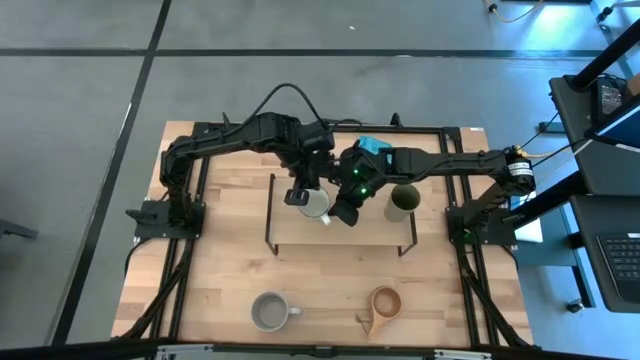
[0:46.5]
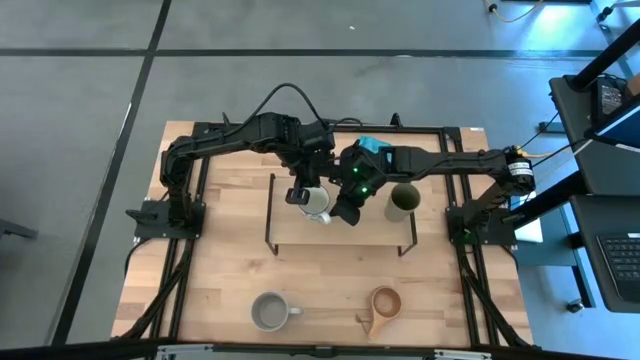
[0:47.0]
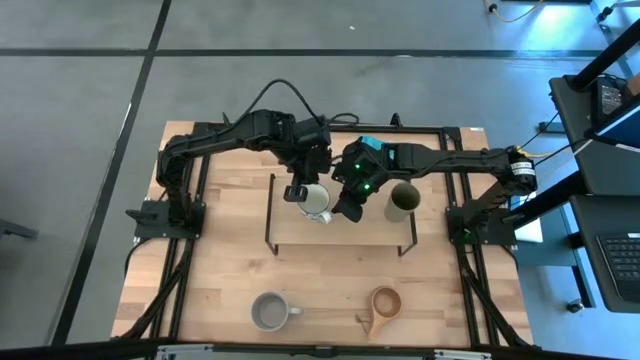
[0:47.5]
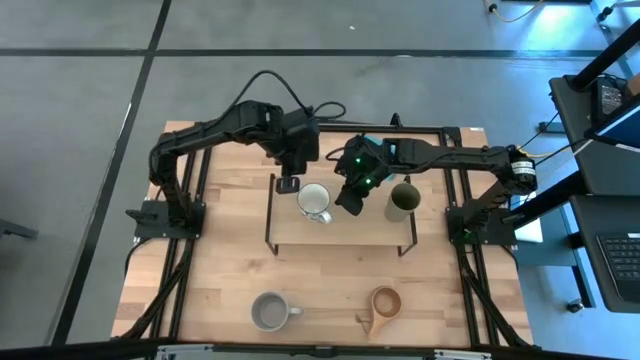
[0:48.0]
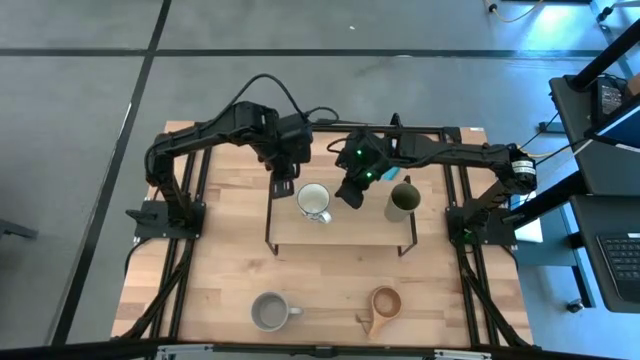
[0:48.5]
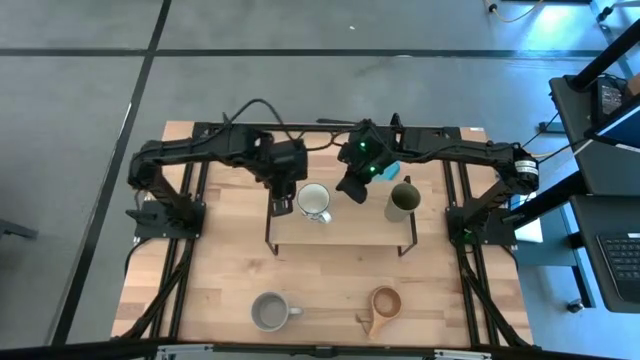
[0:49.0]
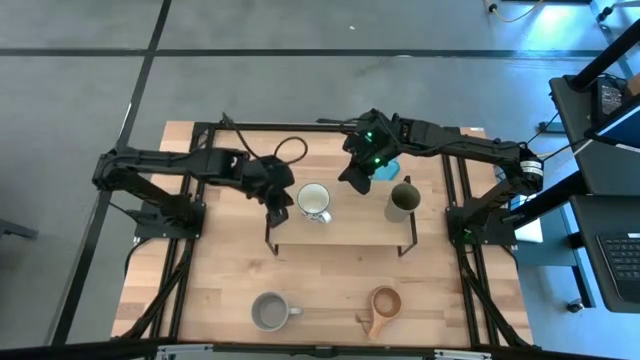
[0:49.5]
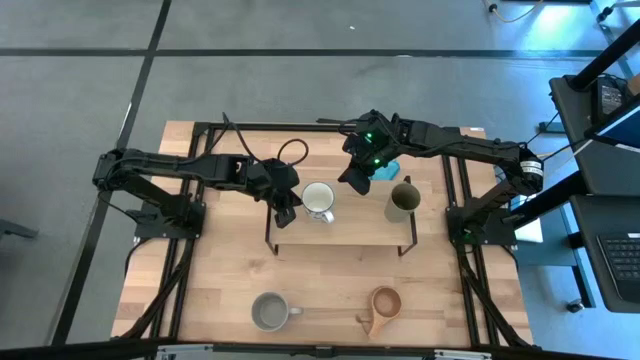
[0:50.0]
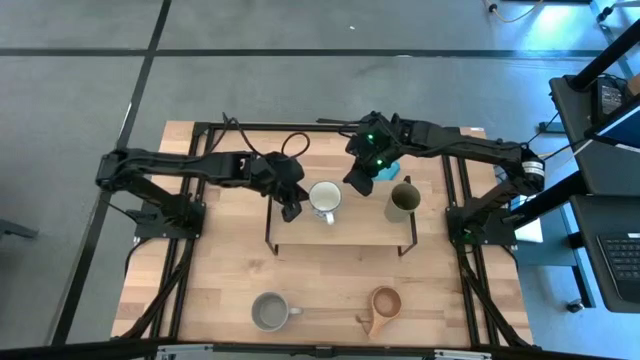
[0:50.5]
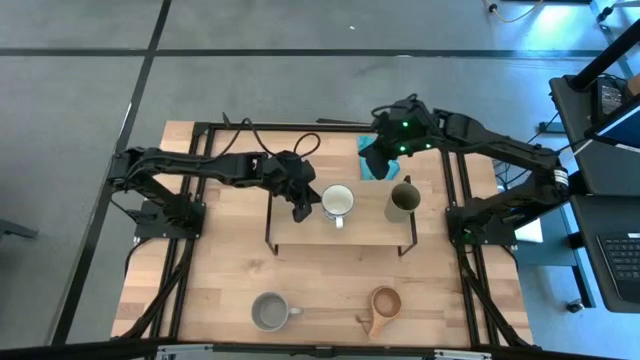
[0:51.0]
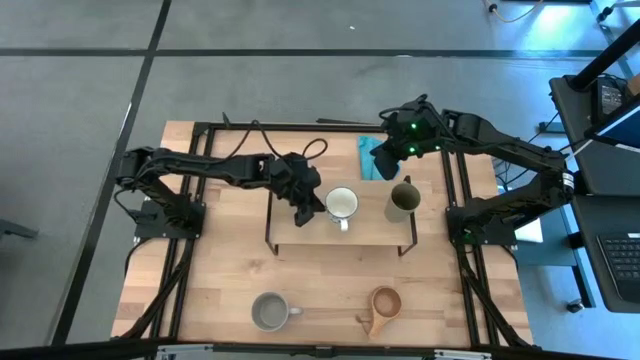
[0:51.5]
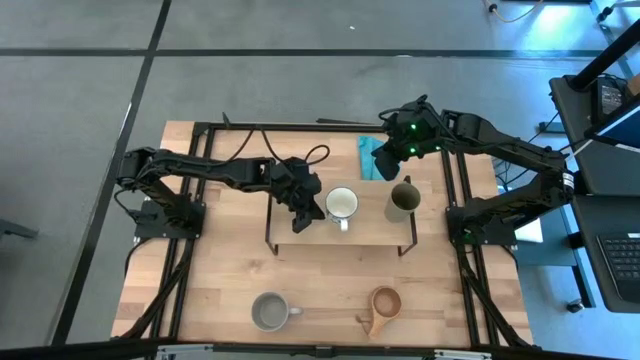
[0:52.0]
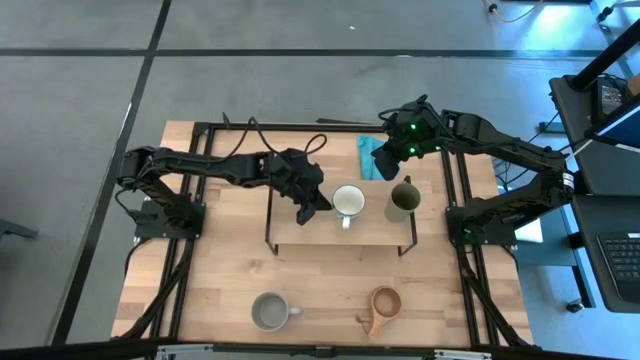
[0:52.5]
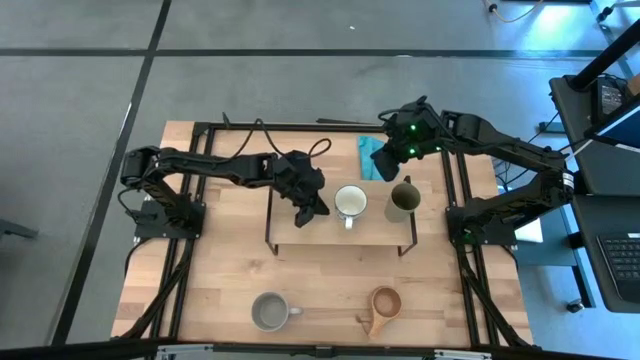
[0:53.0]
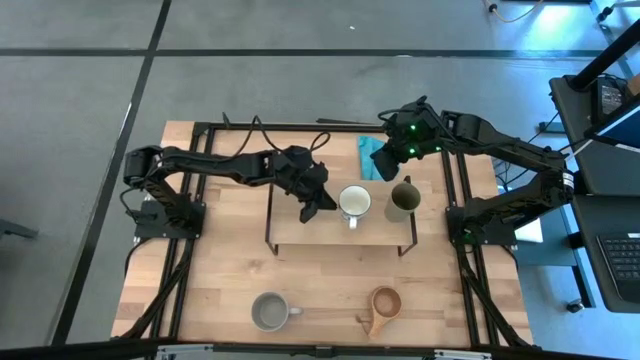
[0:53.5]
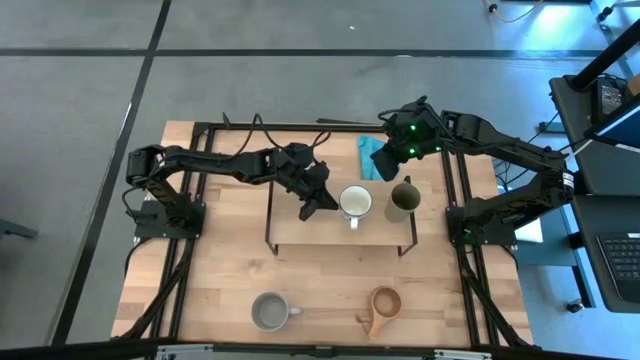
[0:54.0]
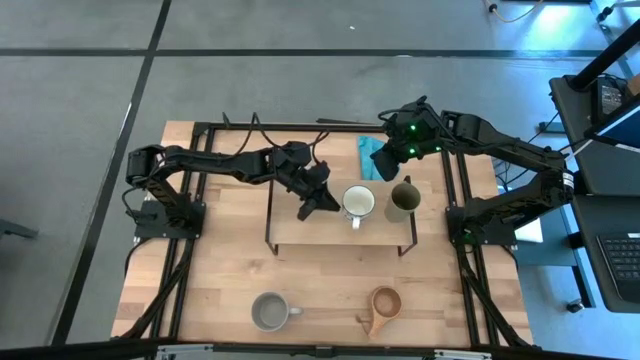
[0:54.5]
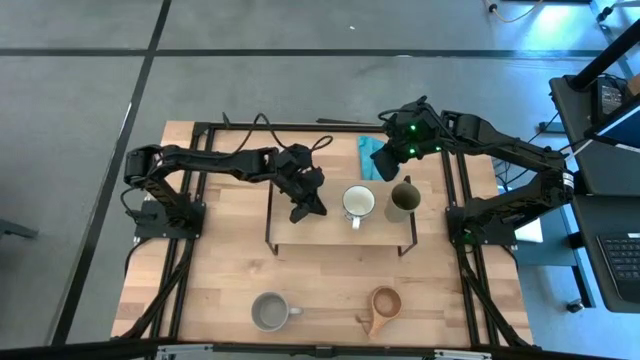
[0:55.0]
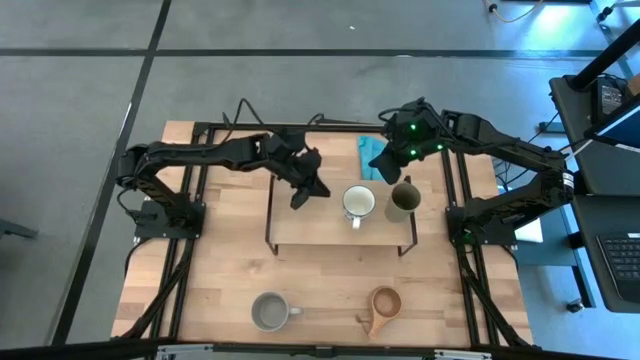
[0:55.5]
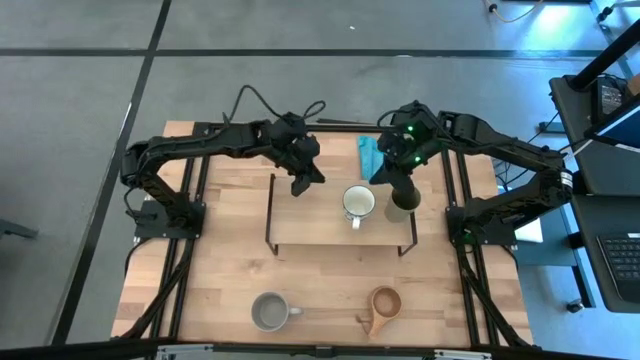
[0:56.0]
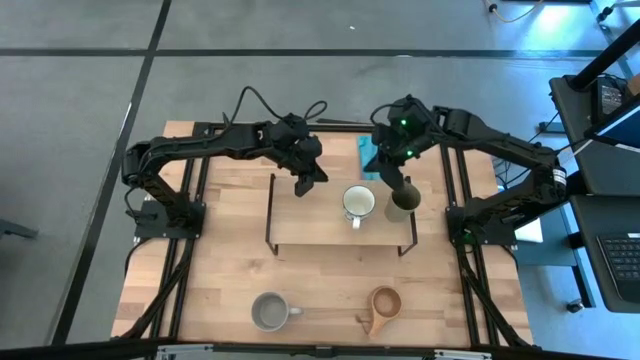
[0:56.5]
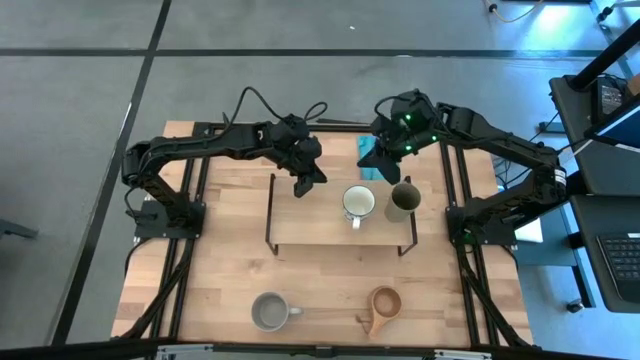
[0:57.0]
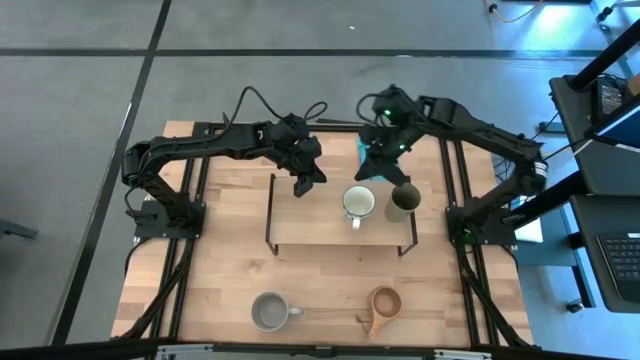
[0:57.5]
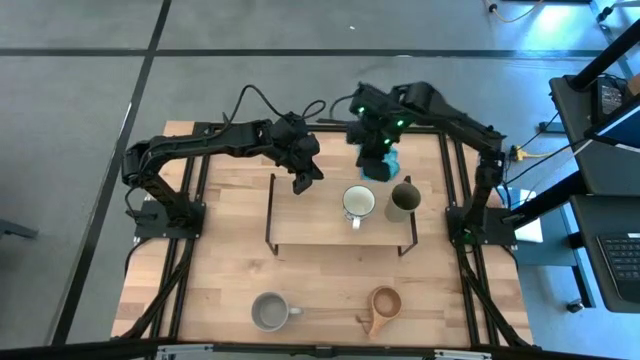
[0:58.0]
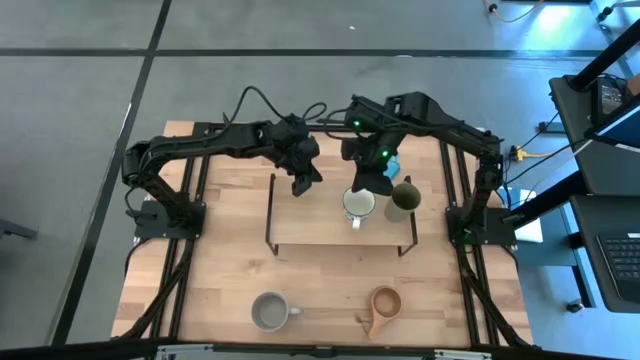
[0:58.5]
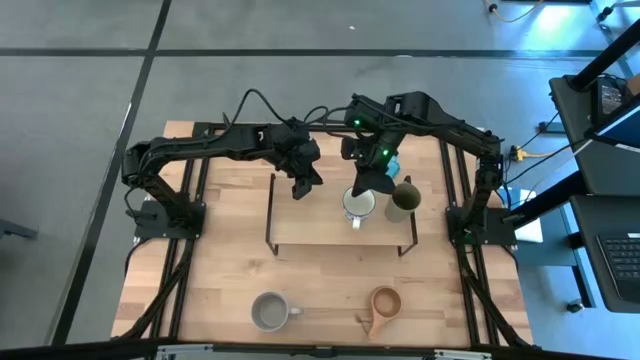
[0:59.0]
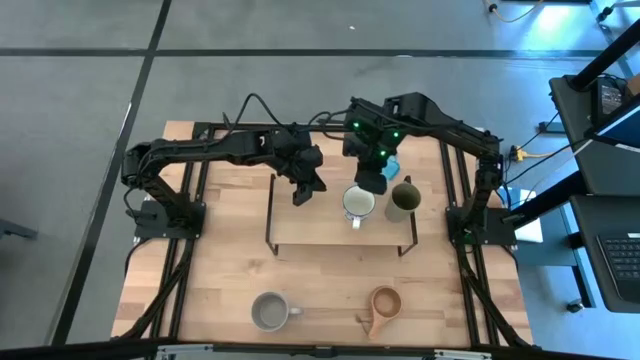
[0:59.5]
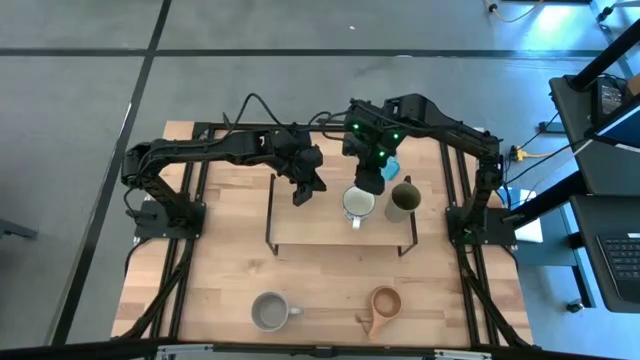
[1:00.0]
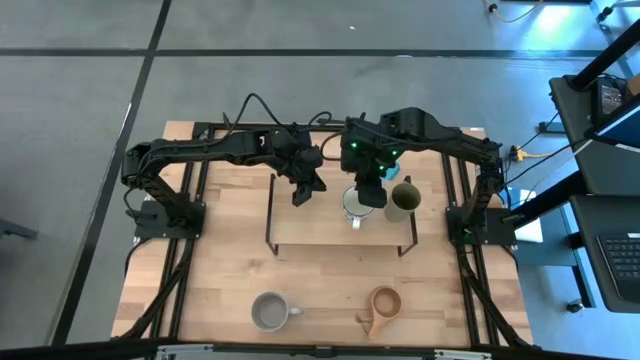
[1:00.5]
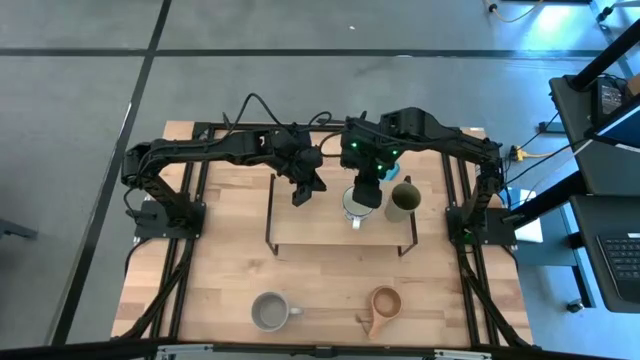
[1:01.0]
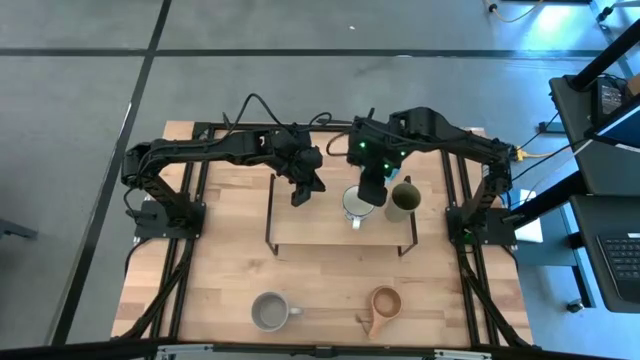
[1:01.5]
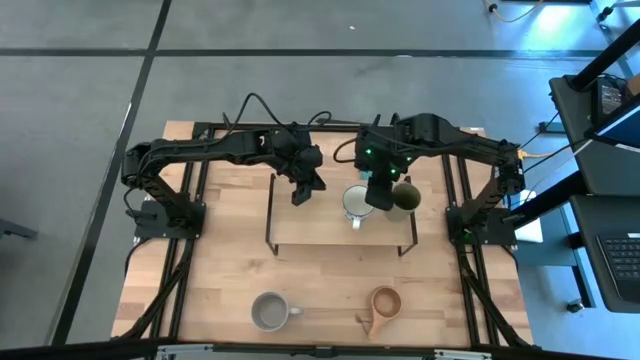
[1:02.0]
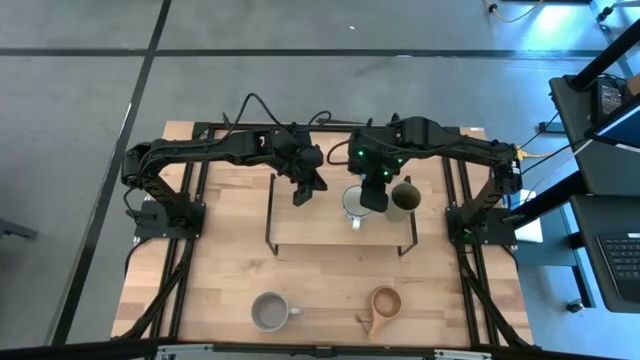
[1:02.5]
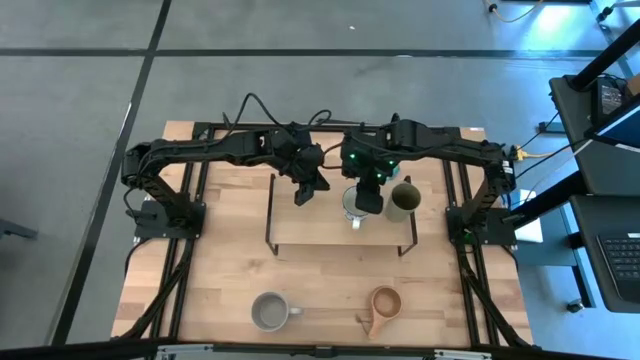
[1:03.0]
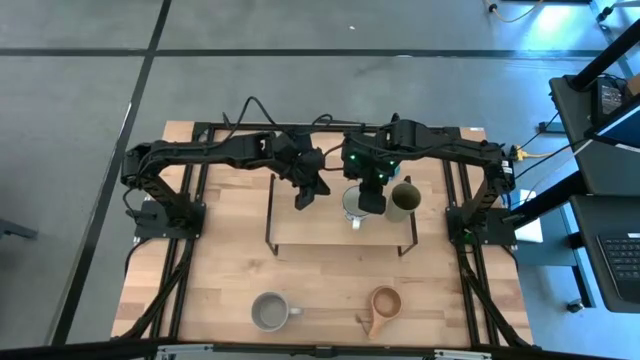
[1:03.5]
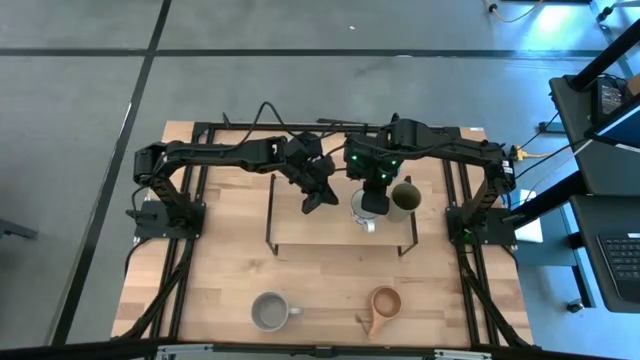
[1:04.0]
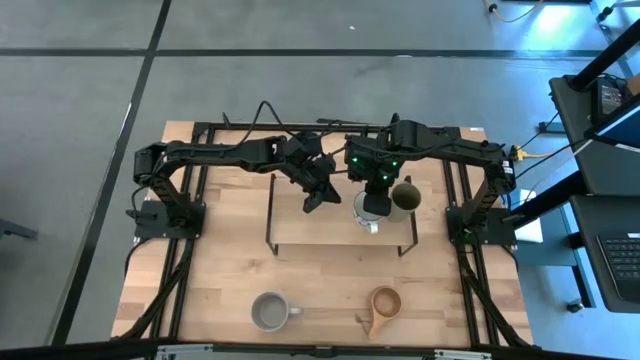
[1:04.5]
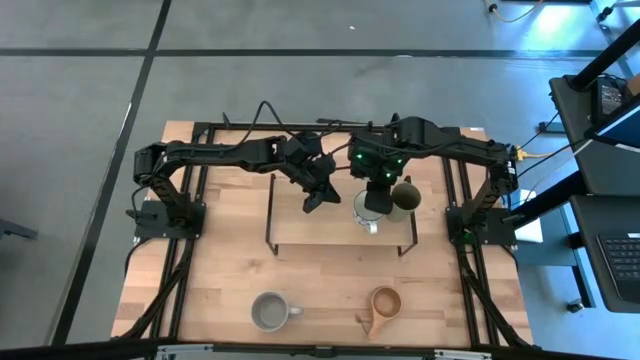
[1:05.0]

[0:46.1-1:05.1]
Task: Stack small to large cups/mugs on shelf
Put the blue patterned mug on the shelf

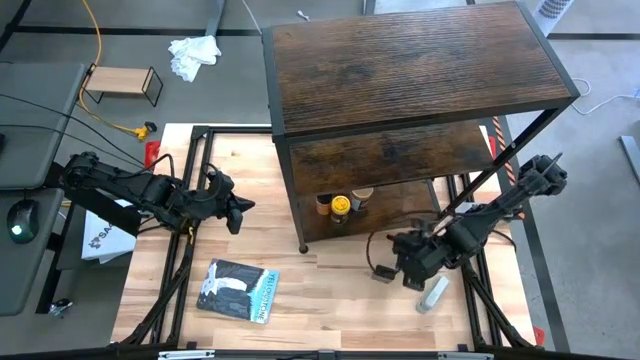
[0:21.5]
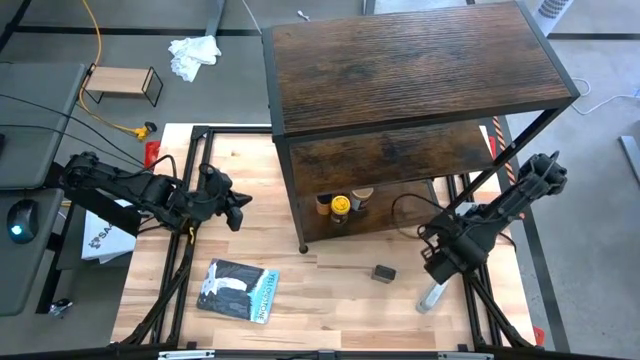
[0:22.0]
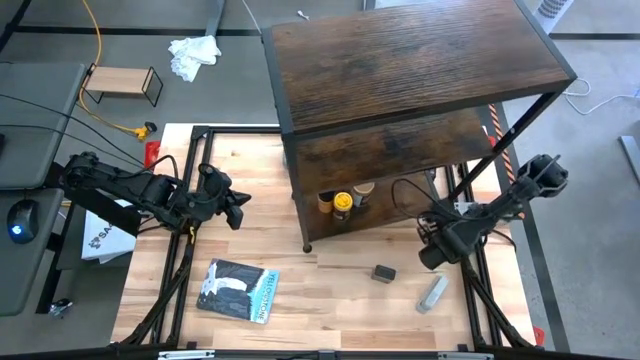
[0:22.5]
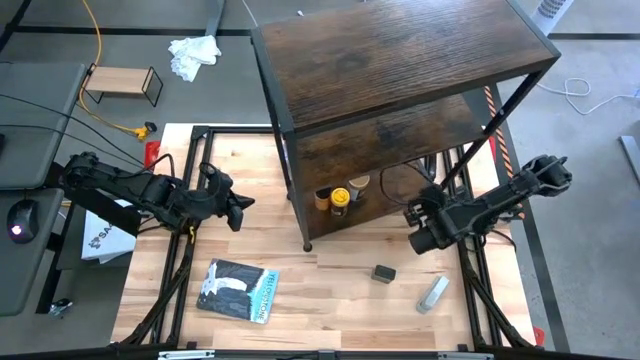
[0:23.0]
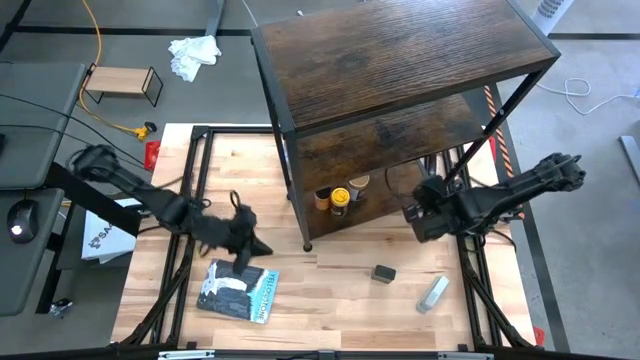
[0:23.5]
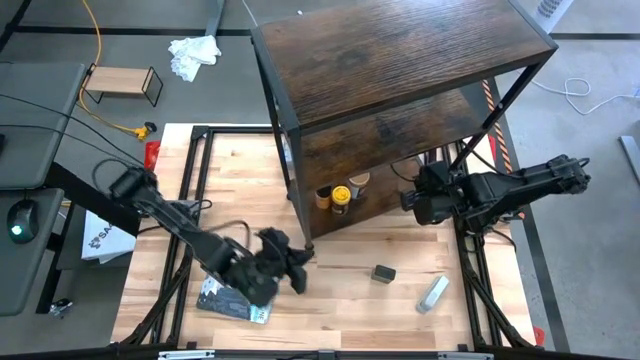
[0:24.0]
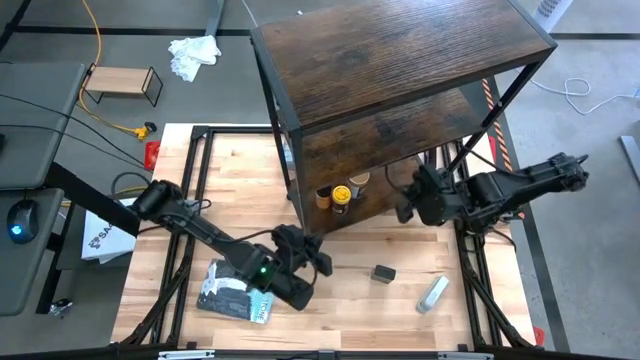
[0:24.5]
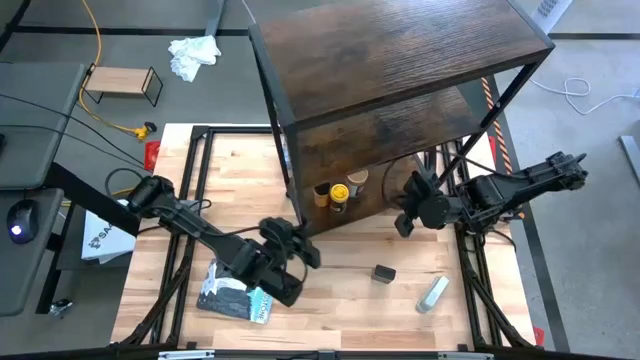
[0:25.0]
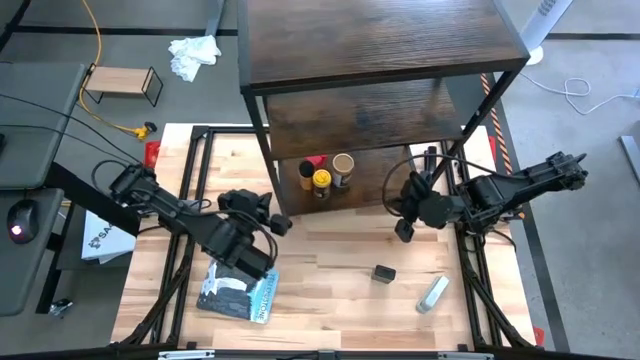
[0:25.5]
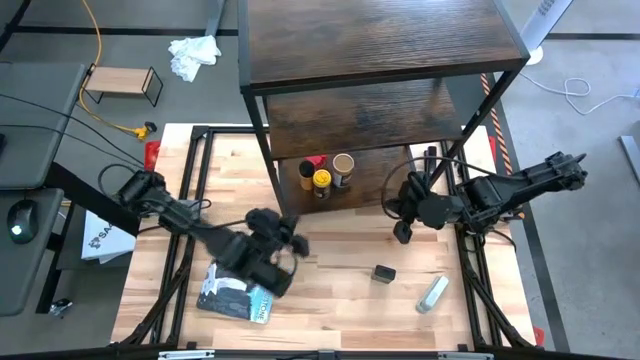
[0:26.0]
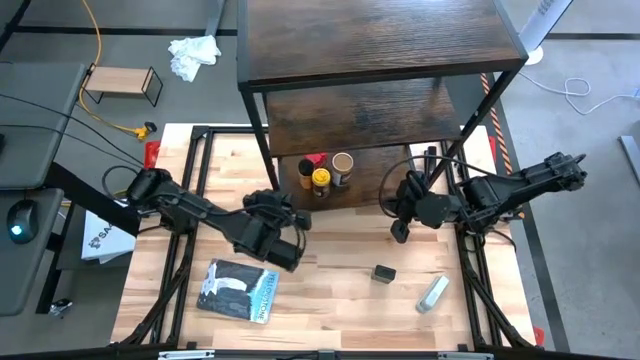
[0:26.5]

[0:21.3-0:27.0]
Task: Shelf spices
Adjust the shelf
